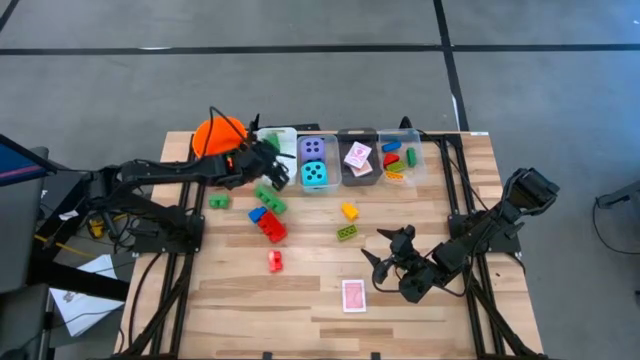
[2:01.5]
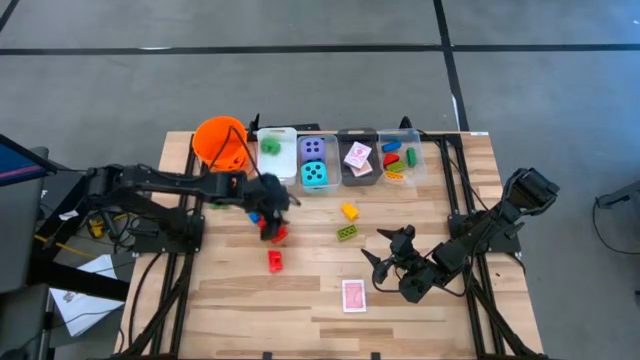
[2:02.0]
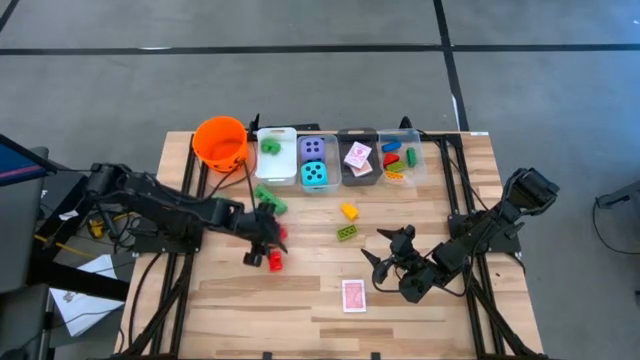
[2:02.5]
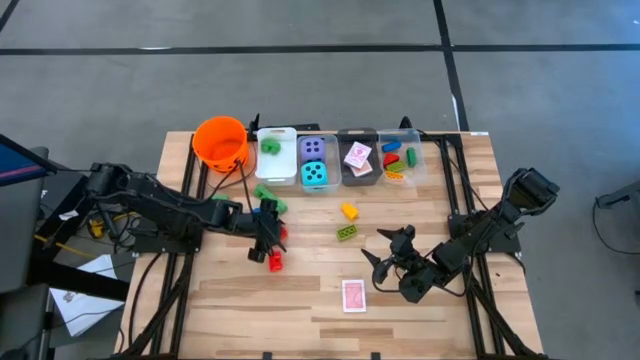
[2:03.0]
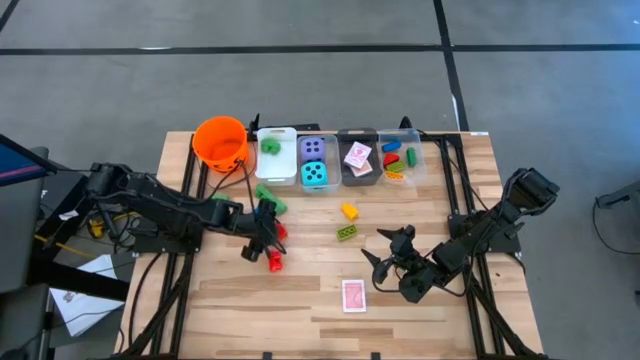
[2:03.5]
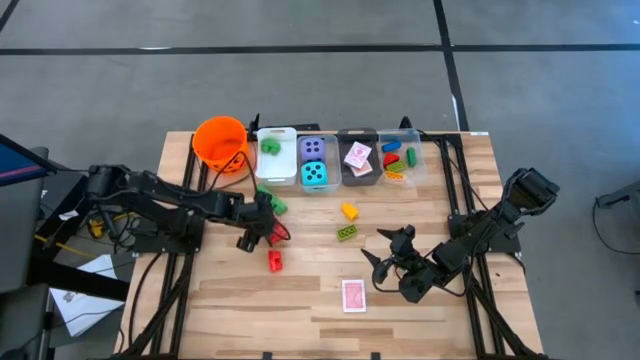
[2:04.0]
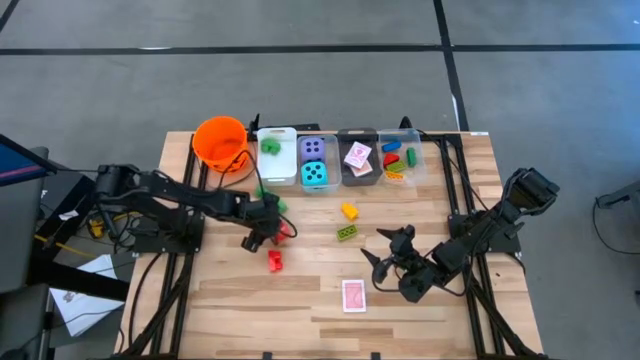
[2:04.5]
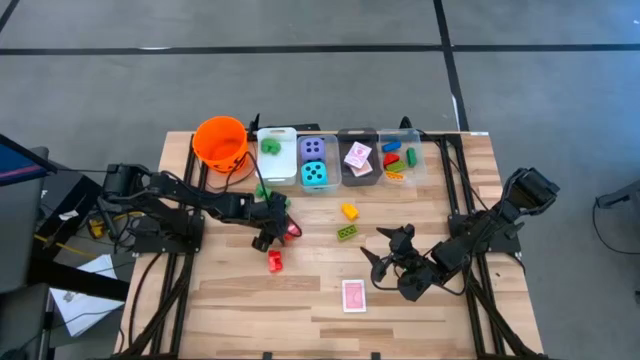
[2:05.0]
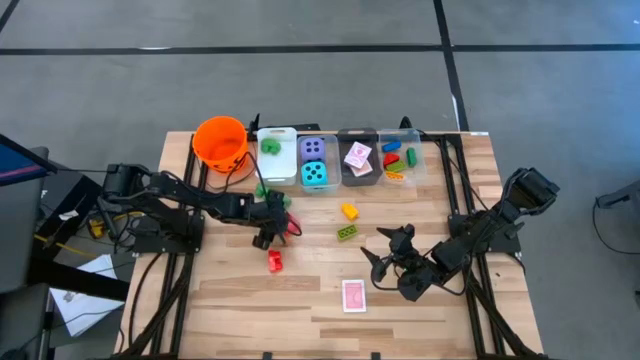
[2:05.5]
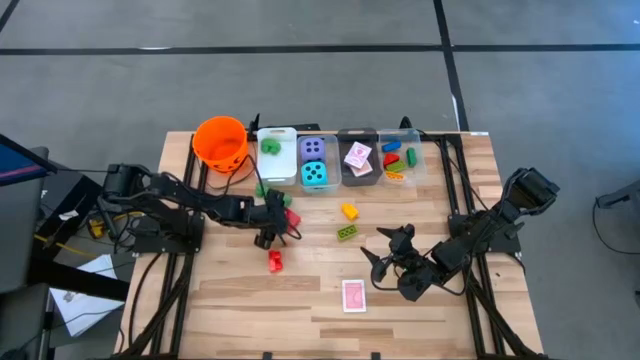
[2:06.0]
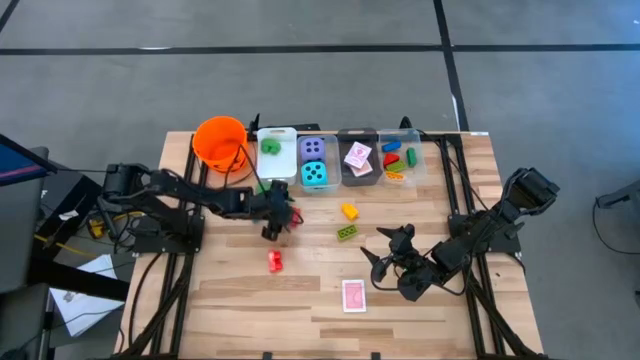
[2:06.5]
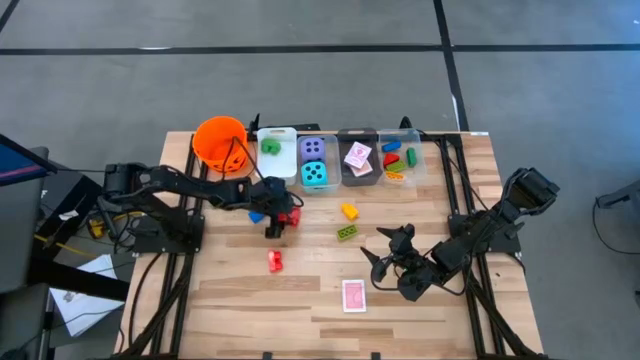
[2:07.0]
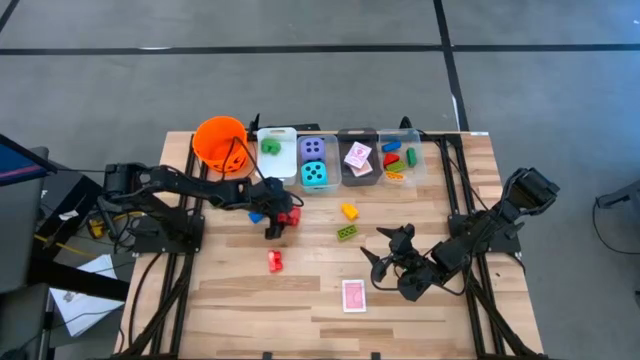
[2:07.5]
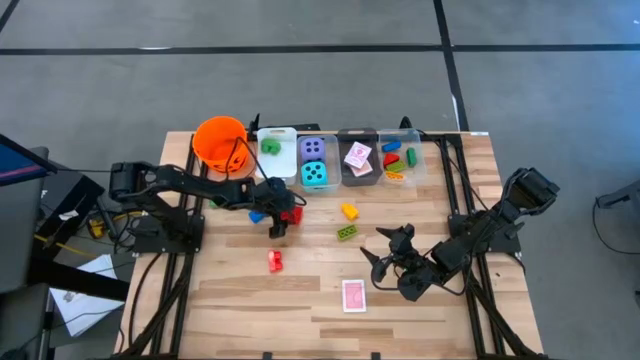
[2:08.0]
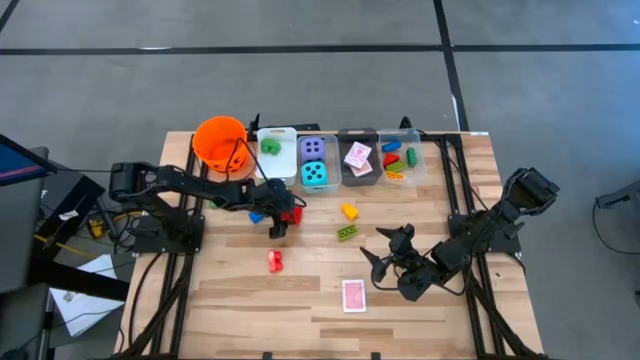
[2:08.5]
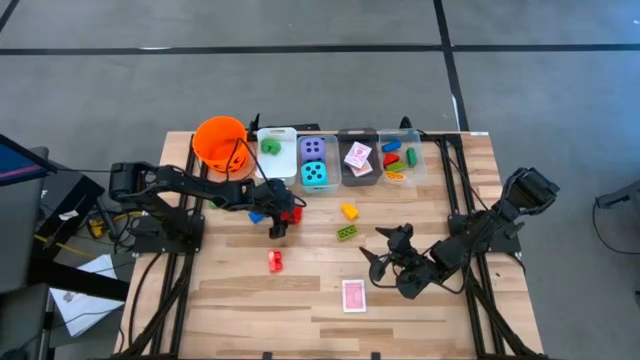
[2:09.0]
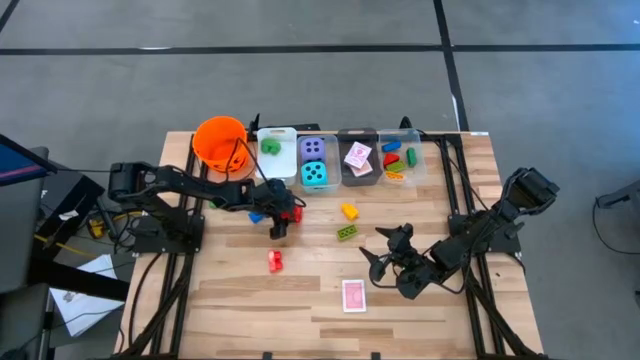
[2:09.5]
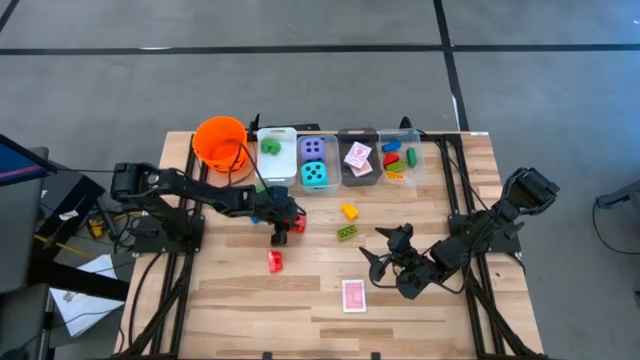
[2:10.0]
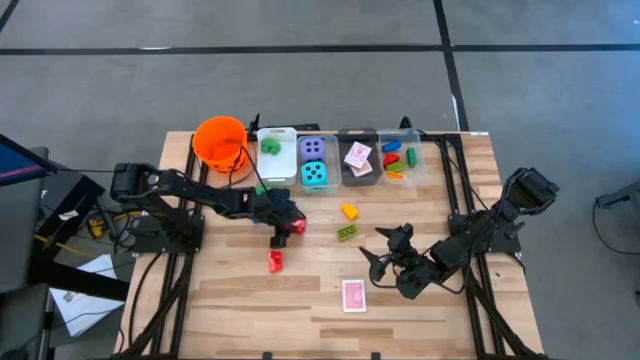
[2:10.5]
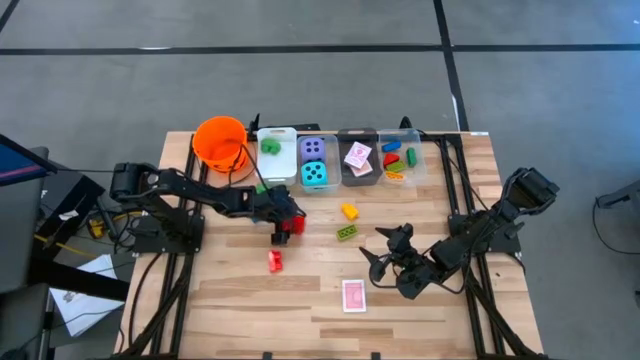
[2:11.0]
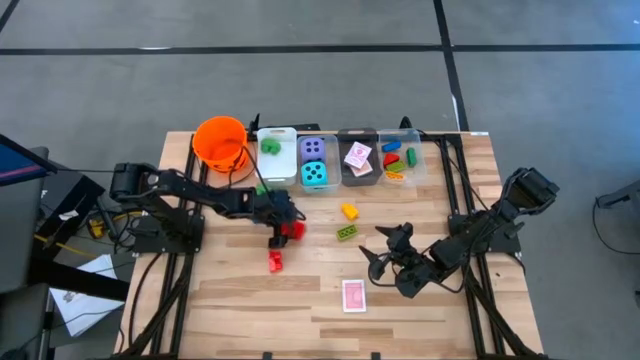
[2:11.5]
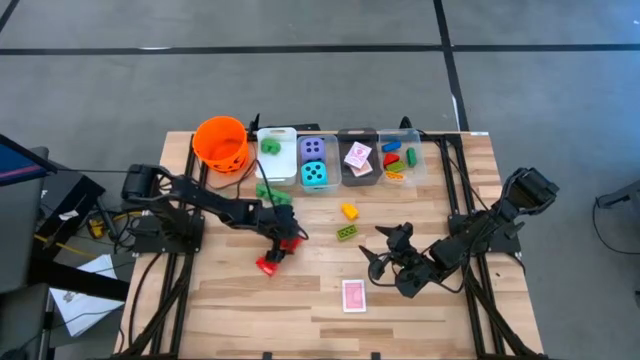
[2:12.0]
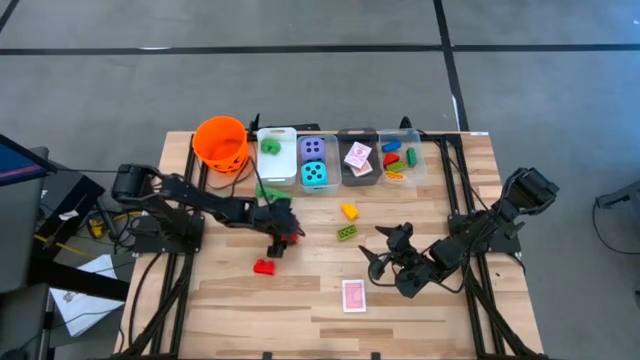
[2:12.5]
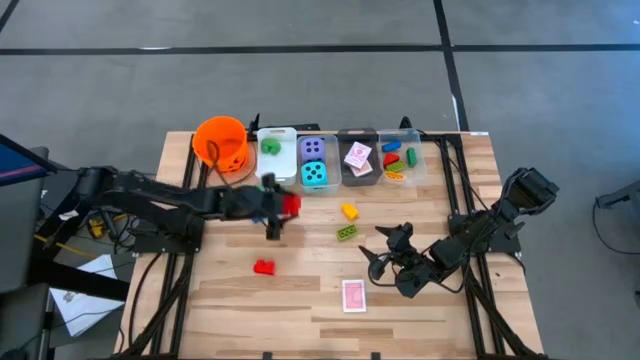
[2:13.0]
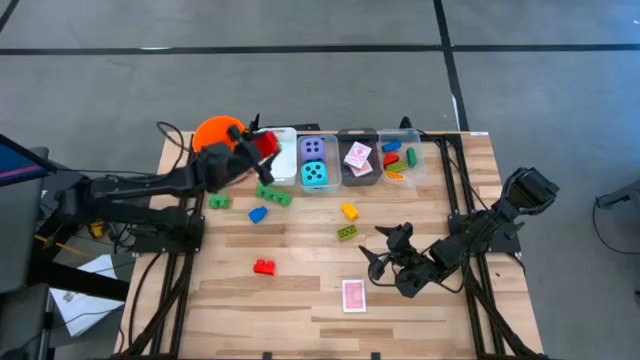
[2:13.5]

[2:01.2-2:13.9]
Task: Pick & Place Toys
Put the big red game piece into the white bin

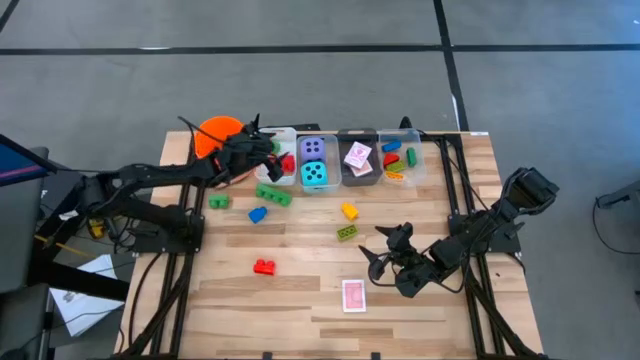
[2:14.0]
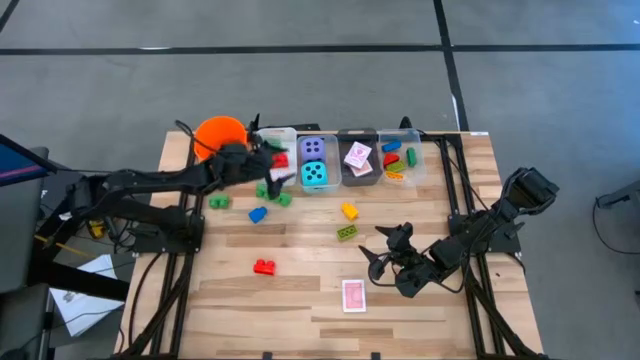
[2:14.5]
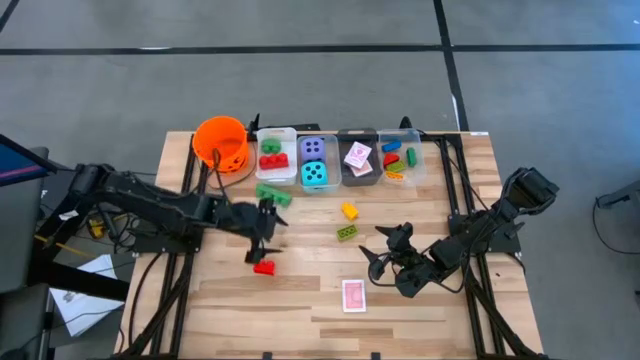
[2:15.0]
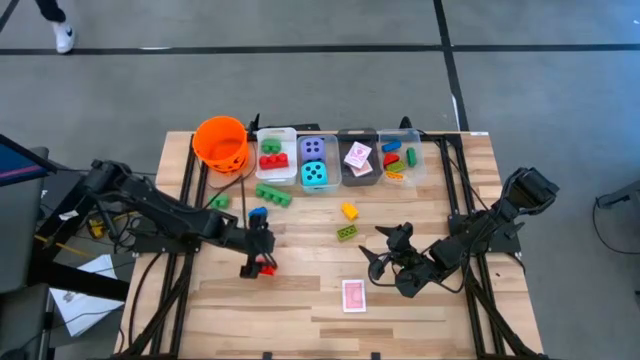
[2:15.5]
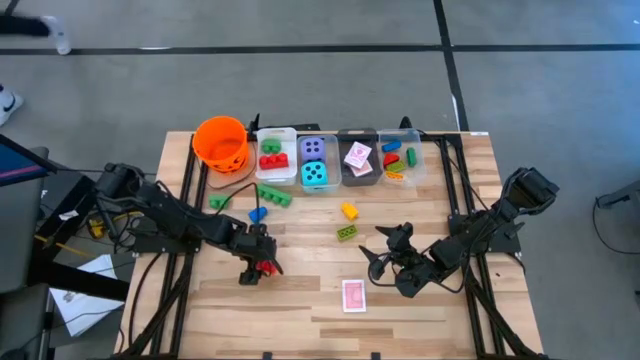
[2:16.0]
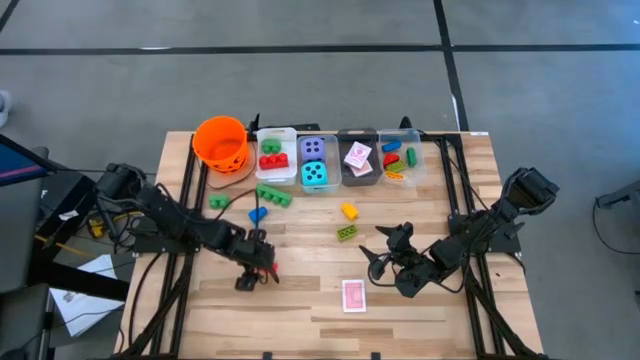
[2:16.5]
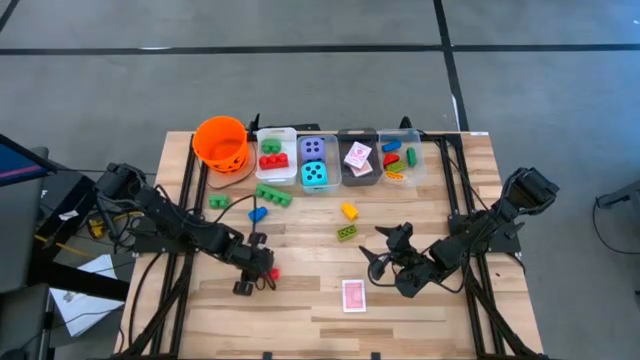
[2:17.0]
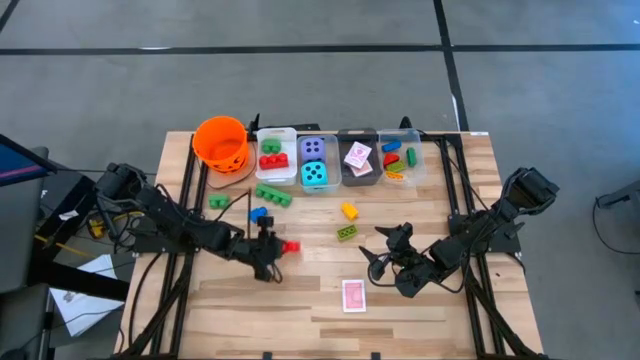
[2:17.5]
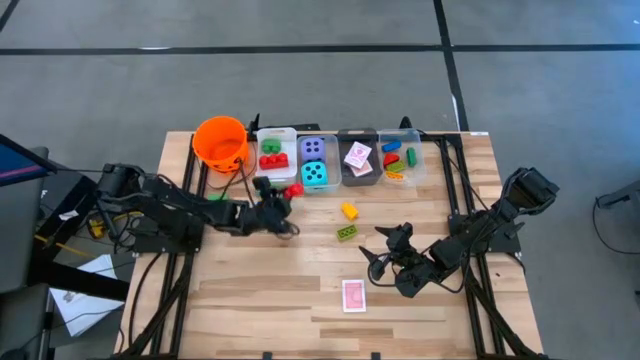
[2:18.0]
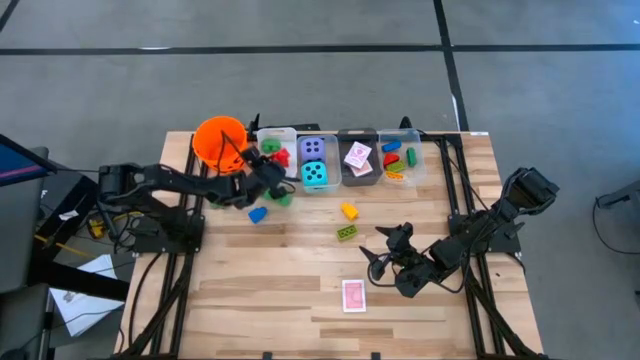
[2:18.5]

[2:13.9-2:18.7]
Put the big red game piece into the white bin

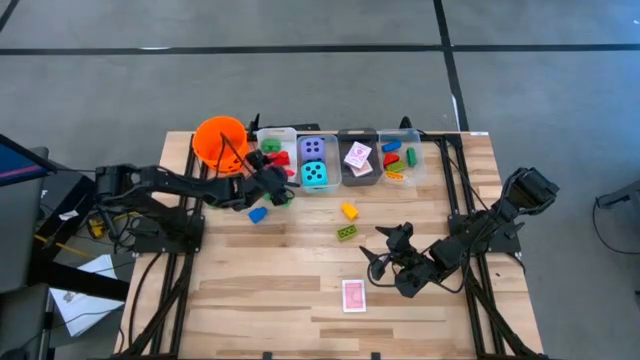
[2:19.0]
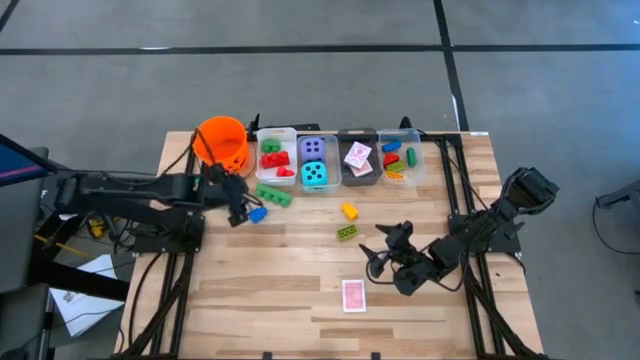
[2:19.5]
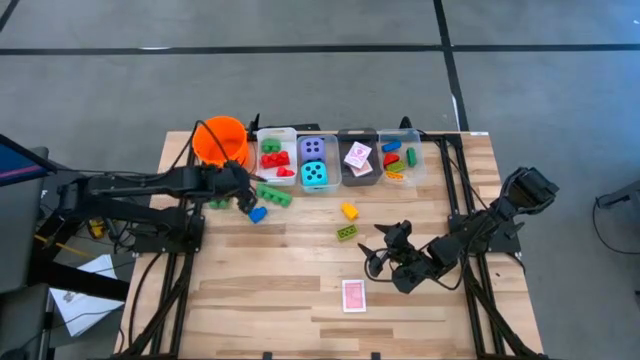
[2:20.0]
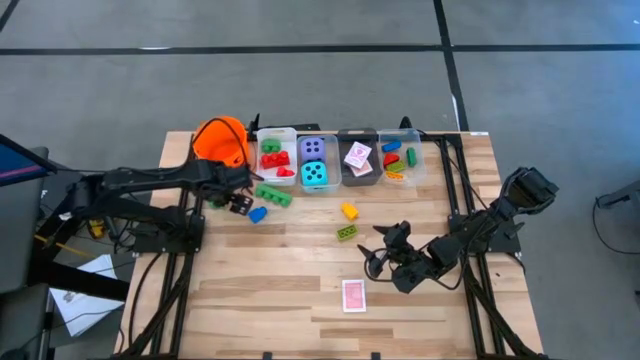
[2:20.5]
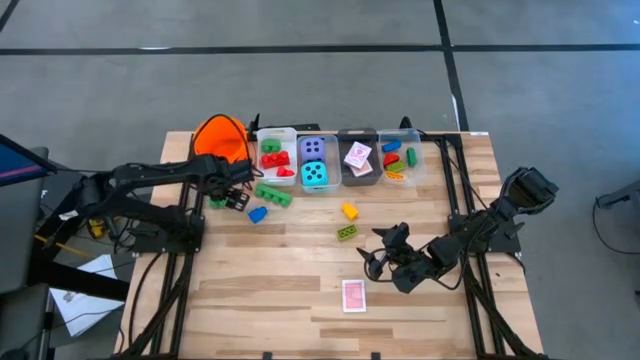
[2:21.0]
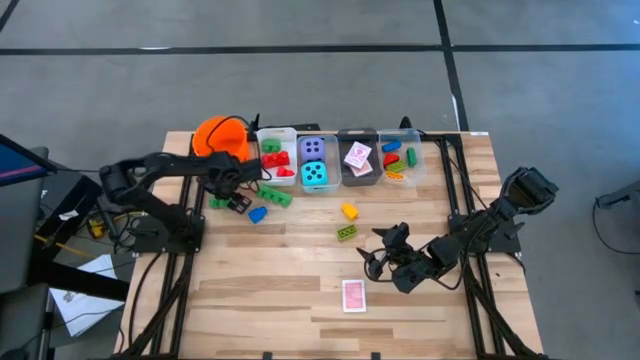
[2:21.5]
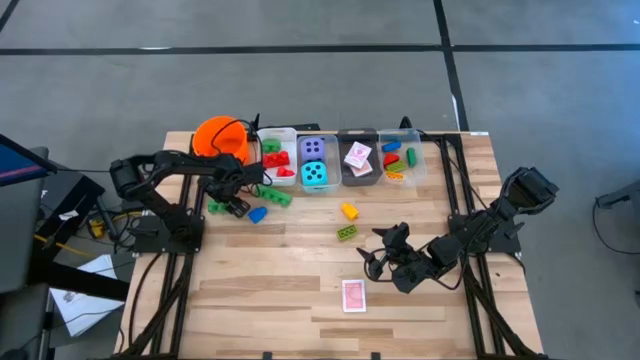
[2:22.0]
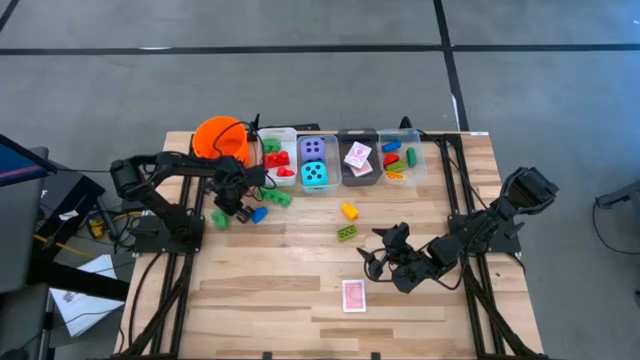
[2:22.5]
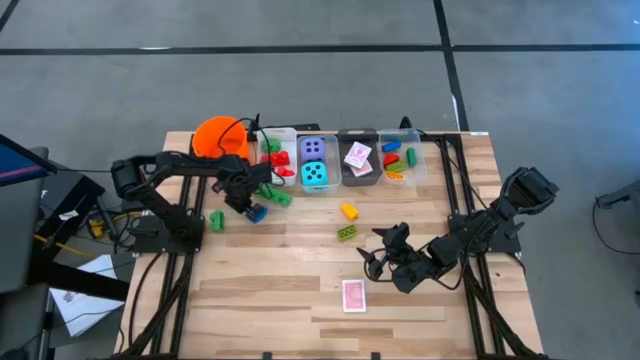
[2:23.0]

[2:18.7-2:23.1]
Put the big green game piece into the white bin
